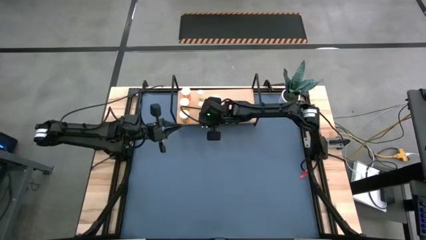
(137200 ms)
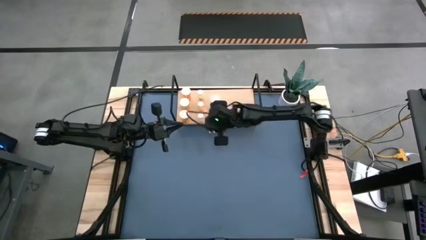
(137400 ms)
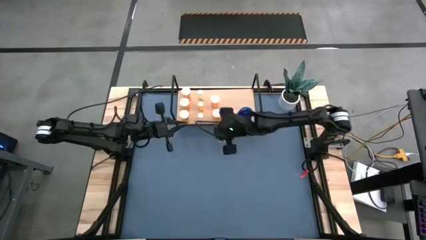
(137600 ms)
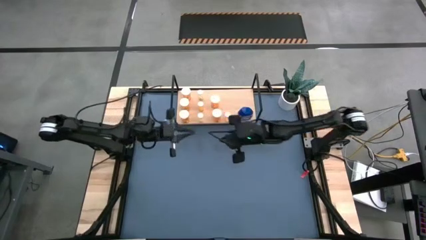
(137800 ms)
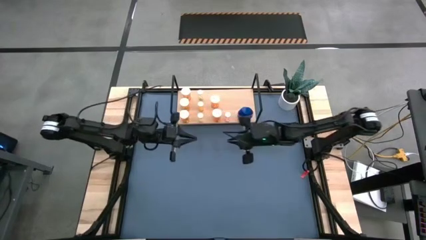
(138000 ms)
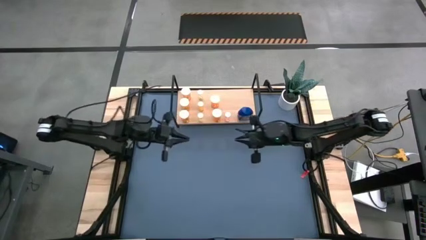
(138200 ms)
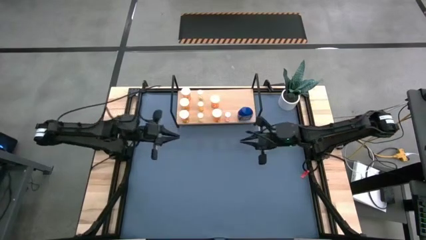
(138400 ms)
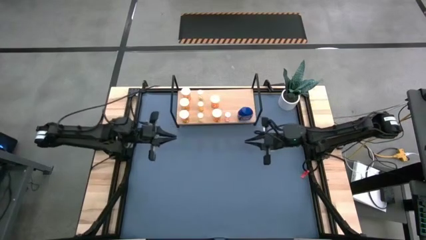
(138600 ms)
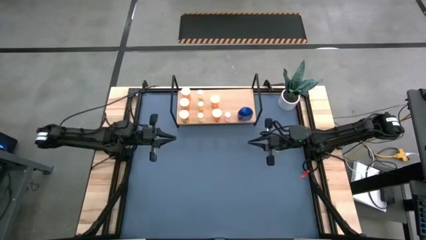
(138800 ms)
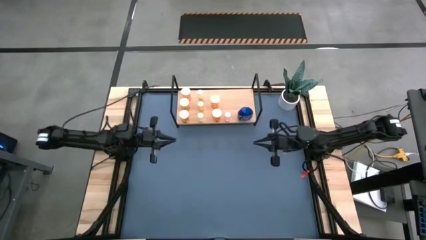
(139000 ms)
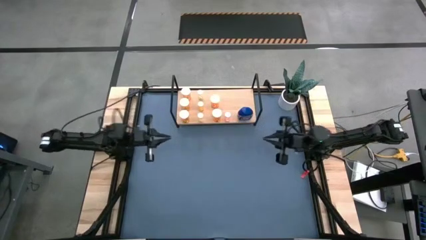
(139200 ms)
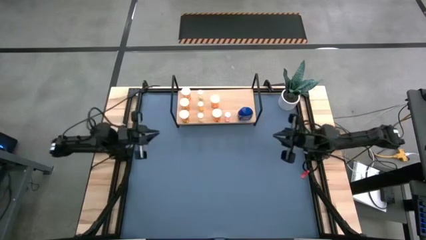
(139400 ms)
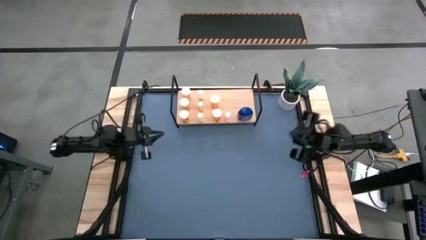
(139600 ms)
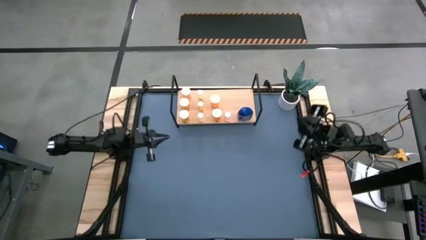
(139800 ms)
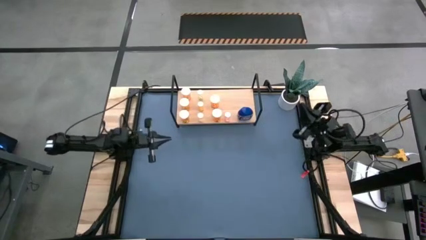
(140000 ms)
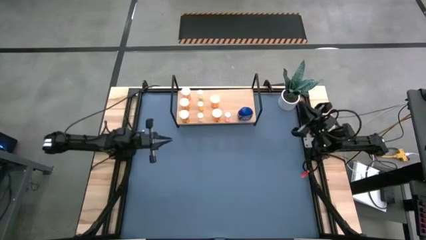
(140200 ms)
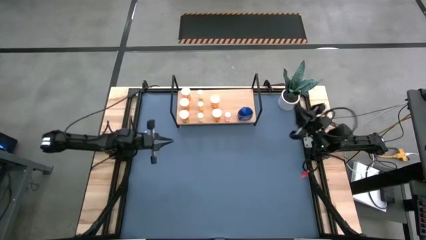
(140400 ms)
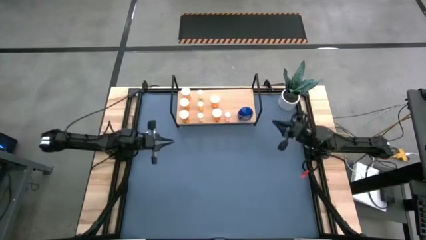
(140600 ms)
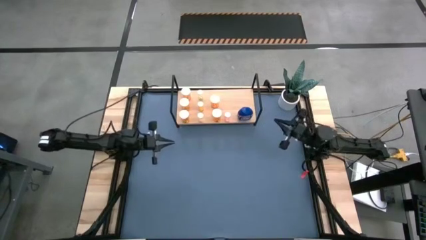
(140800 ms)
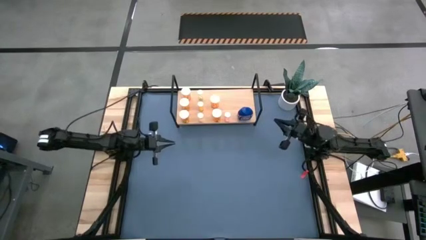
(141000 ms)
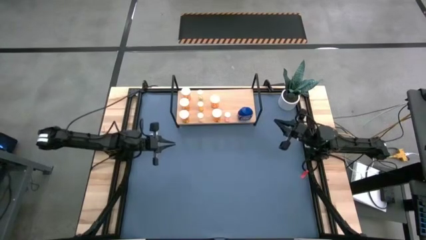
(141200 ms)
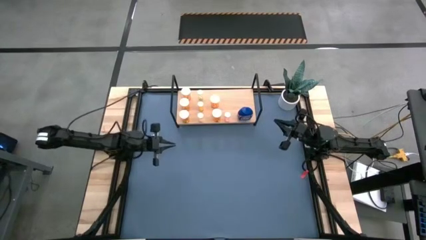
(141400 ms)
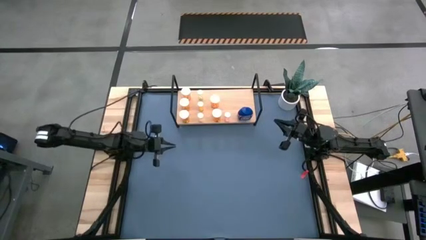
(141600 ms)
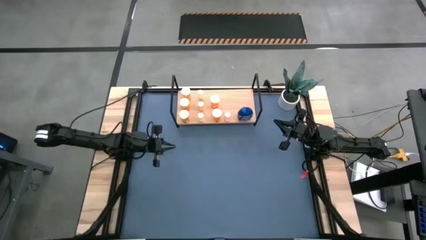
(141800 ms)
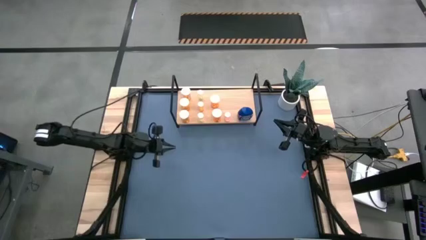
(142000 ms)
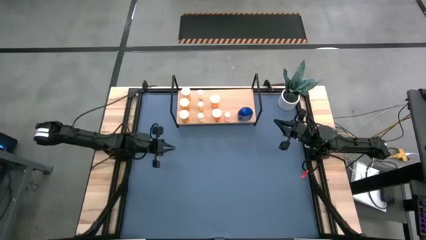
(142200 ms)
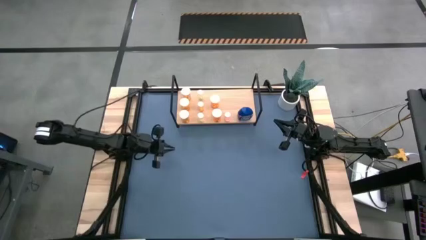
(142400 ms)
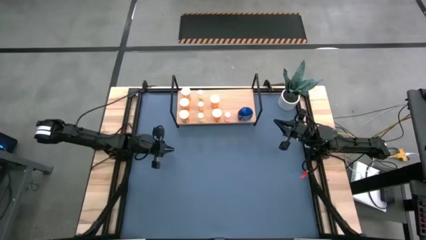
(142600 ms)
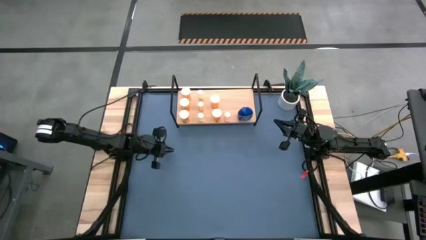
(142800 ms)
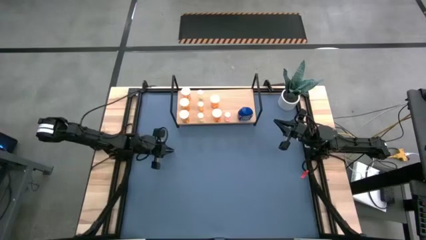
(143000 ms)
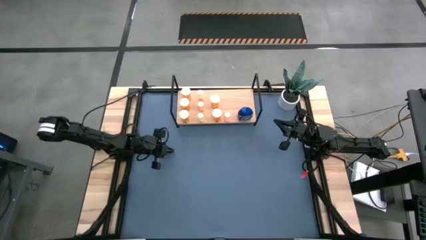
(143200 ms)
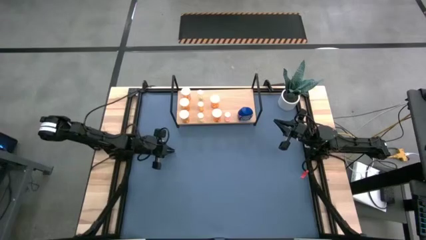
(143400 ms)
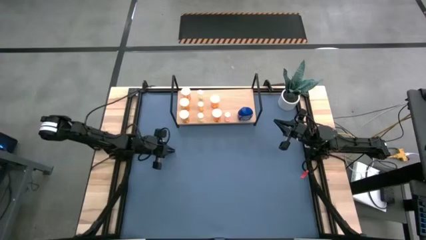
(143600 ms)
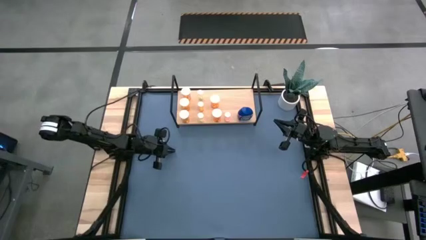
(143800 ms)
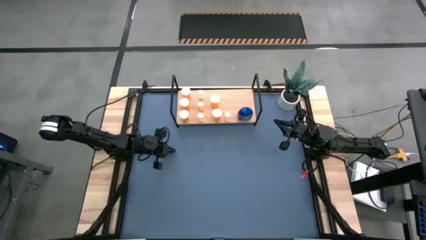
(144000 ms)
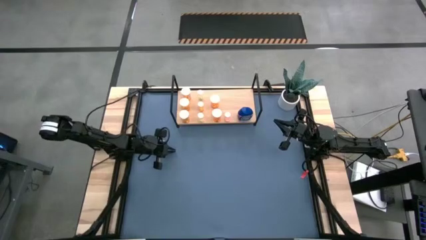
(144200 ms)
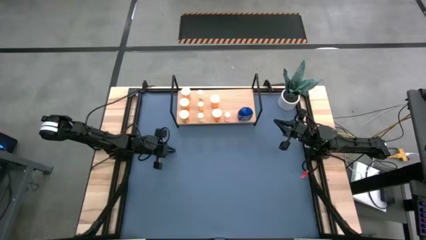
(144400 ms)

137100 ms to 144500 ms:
Task: Pick and place medicine bottles onto shelf by color
Return to Home Position

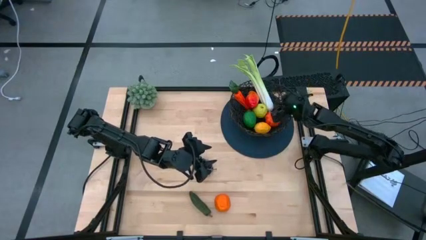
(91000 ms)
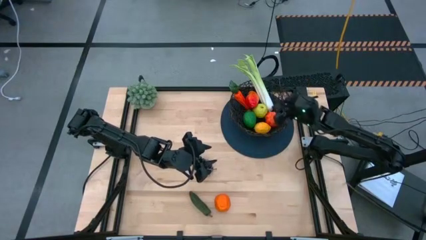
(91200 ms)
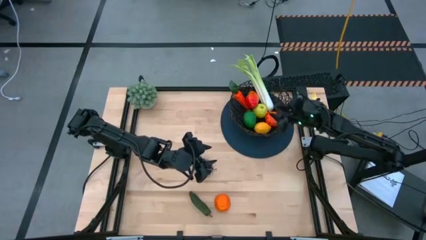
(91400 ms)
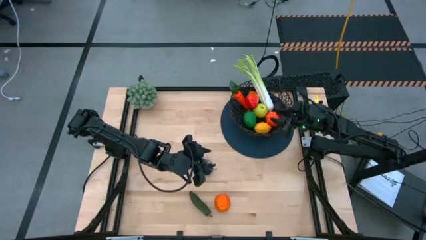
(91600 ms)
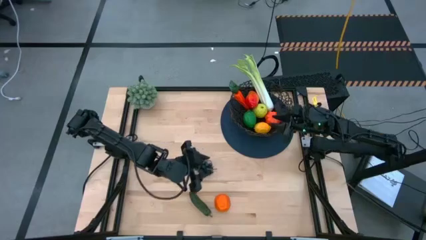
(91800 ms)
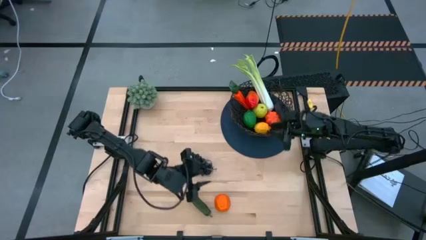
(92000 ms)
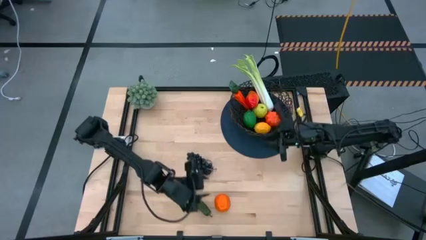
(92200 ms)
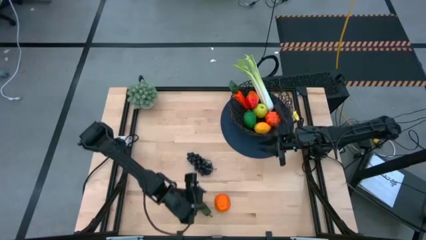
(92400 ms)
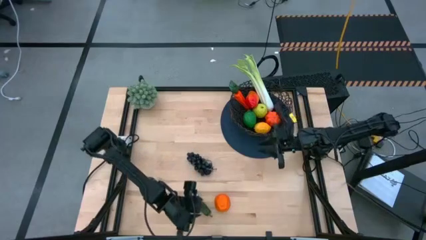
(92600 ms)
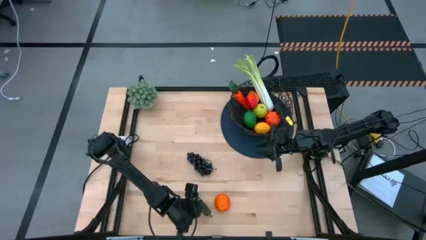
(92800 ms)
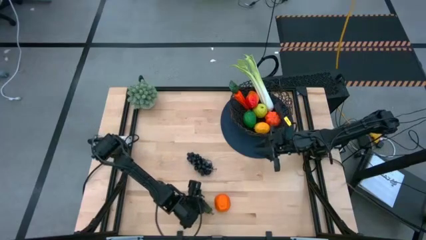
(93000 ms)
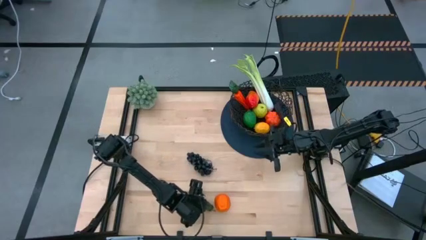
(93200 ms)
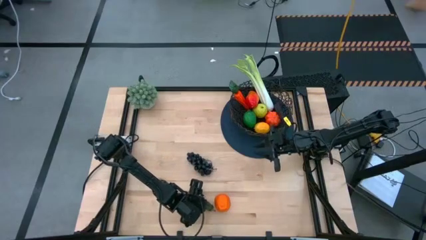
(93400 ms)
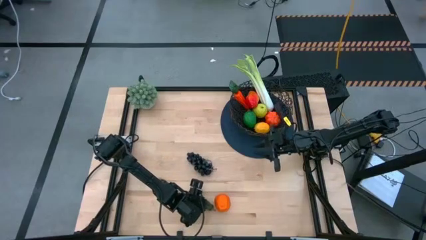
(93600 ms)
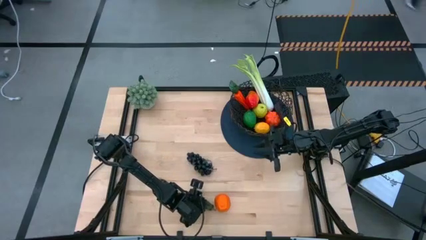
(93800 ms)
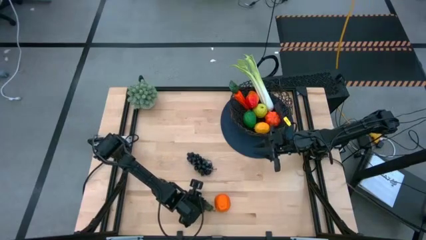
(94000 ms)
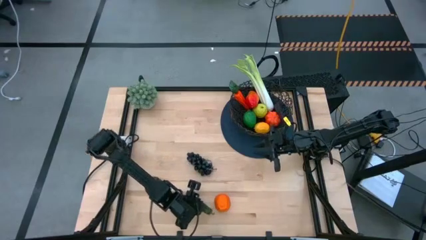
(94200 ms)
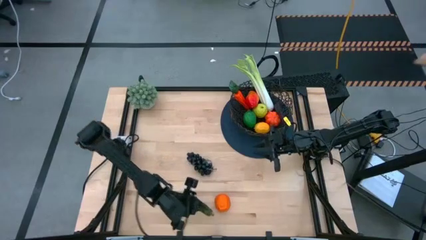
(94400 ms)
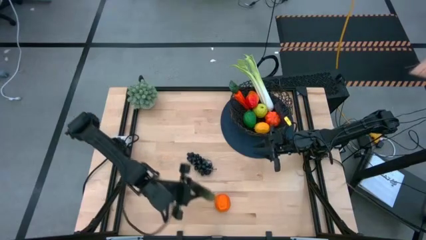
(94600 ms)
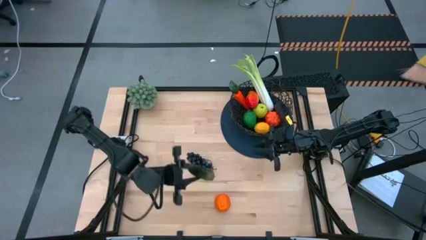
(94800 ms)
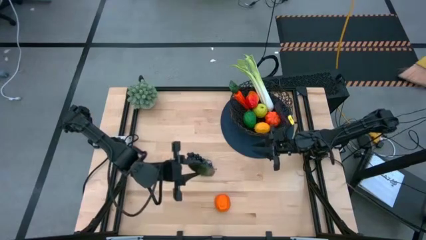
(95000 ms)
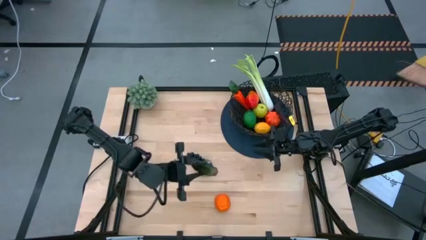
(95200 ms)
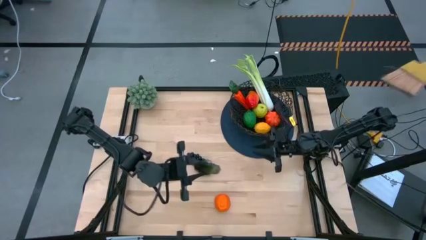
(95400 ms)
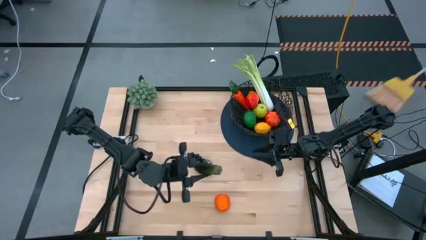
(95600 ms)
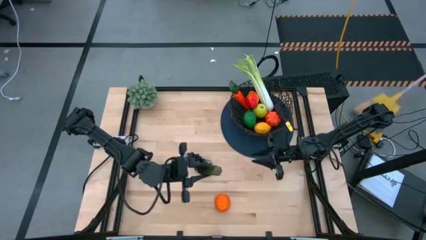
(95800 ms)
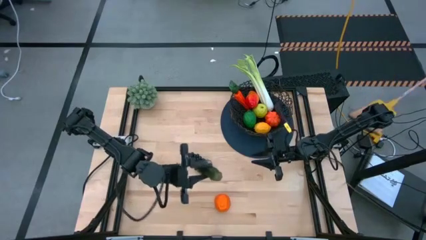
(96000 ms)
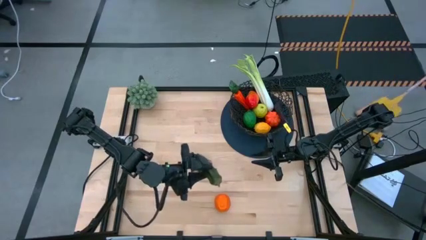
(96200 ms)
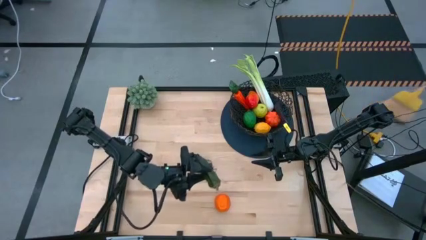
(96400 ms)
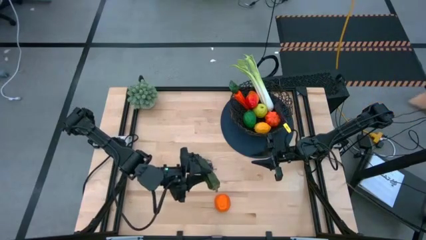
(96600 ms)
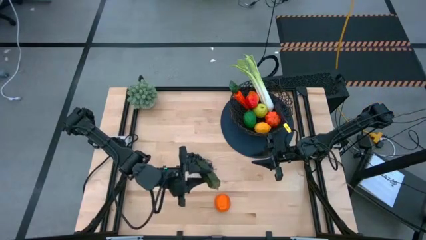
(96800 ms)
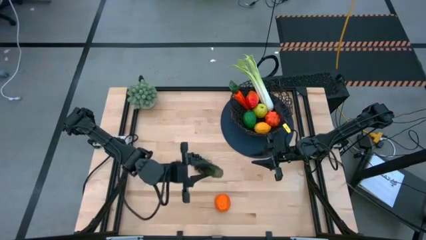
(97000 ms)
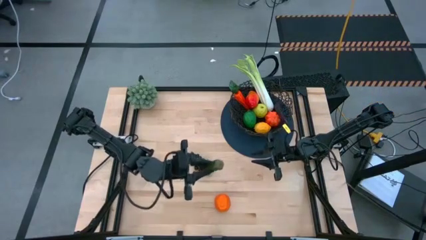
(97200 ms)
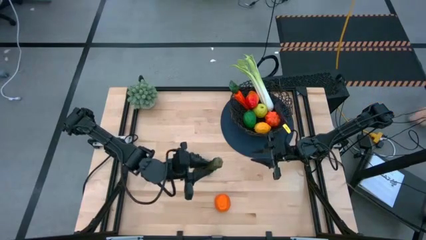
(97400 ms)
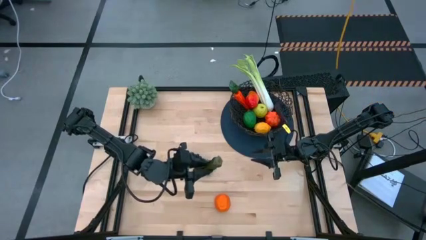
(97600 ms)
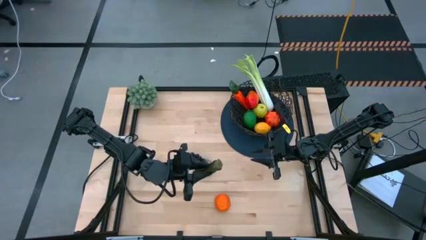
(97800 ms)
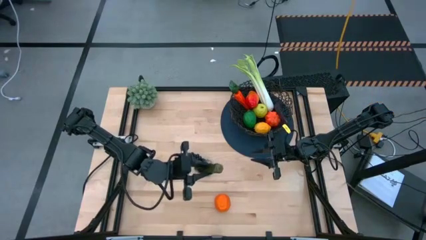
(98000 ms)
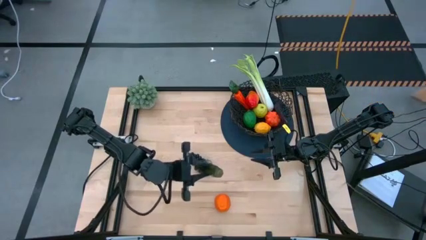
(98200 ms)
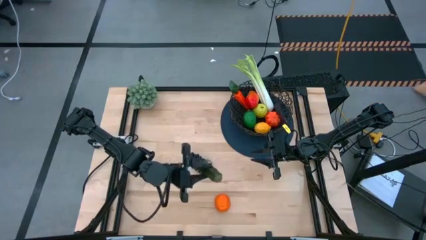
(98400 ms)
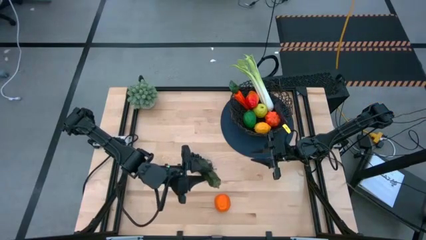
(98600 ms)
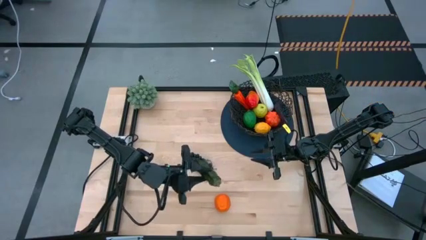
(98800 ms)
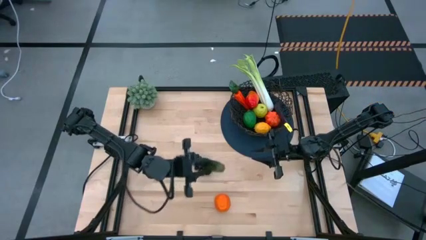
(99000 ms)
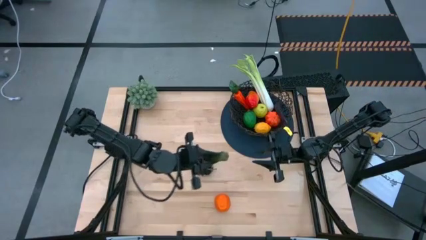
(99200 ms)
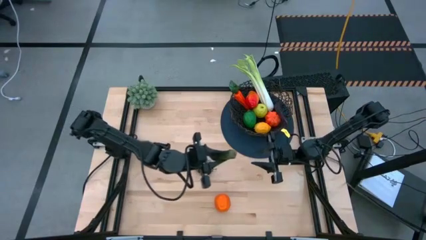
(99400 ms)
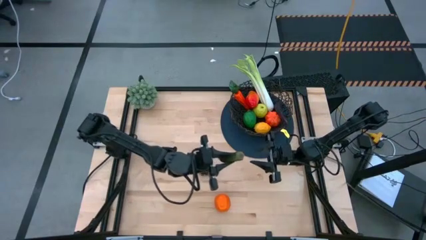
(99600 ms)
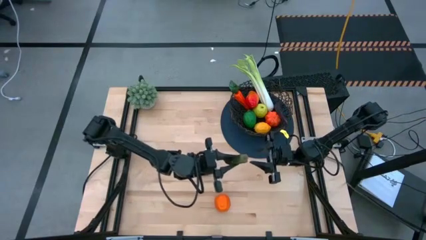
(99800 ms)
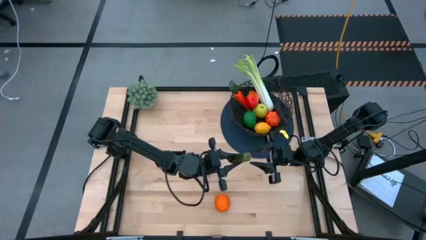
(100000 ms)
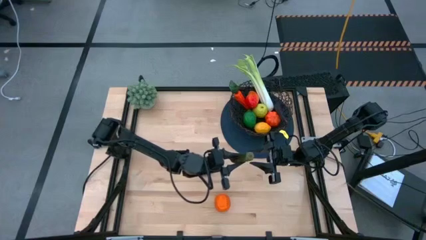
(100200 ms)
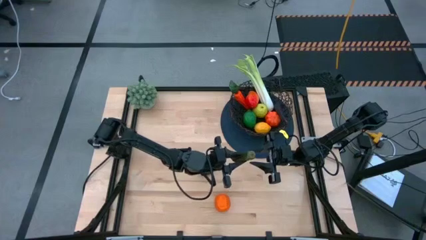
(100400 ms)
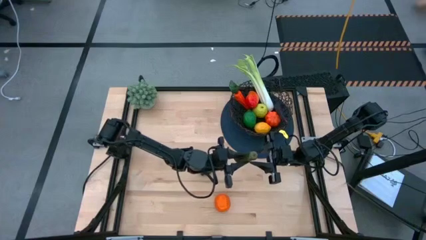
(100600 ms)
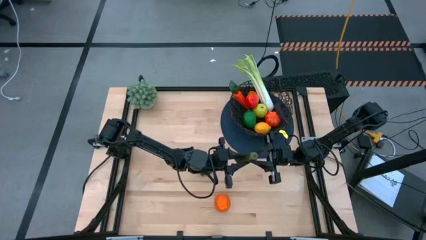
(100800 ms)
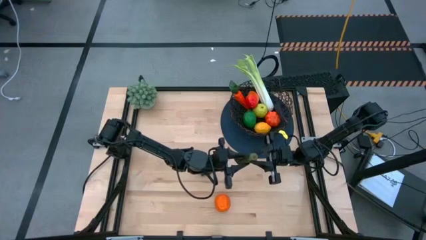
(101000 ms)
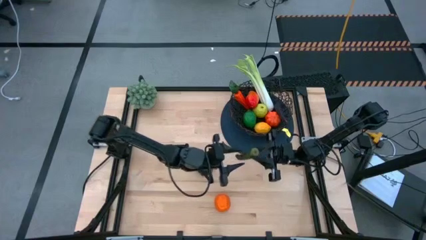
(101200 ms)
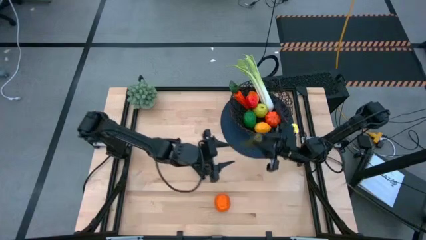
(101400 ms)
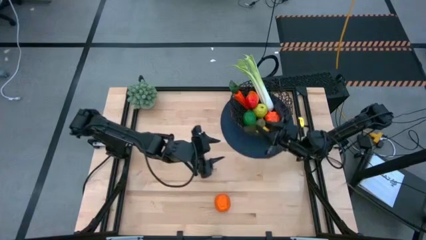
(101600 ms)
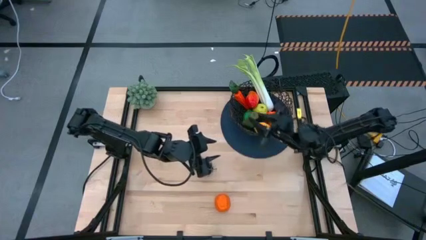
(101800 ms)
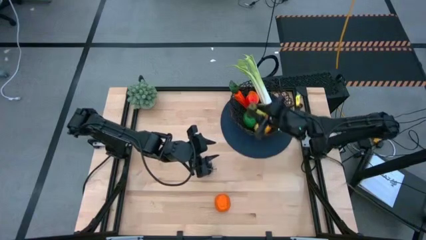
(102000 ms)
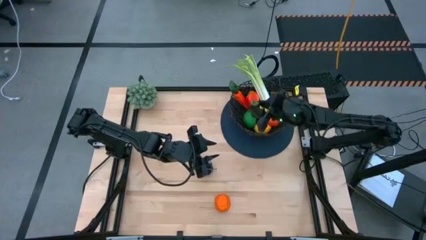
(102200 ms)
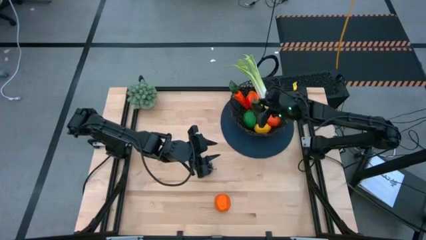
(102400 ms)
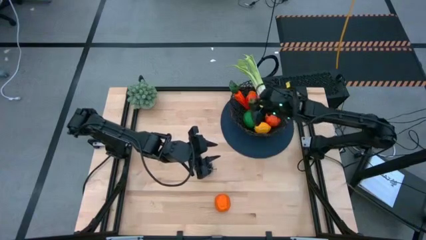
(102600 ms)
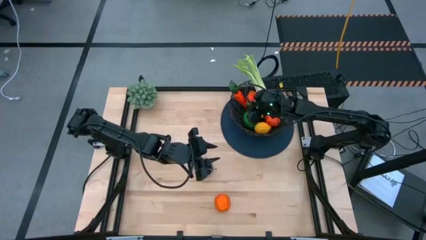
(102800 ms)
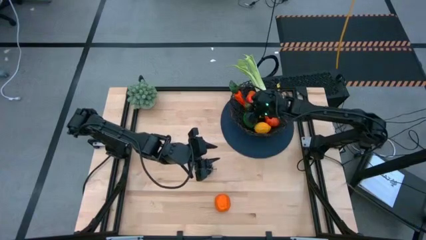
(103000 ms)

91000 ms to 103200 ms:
Task: Build produce basket
Put the green chili pepper into the black wire basket
